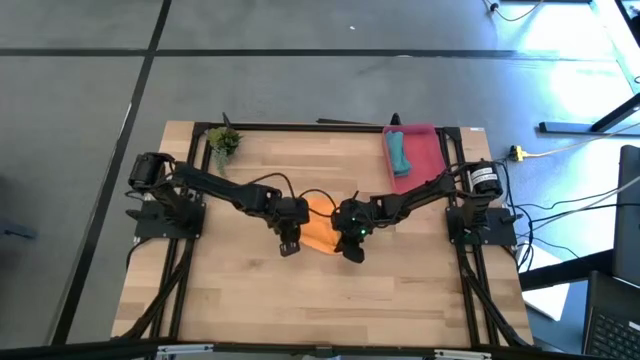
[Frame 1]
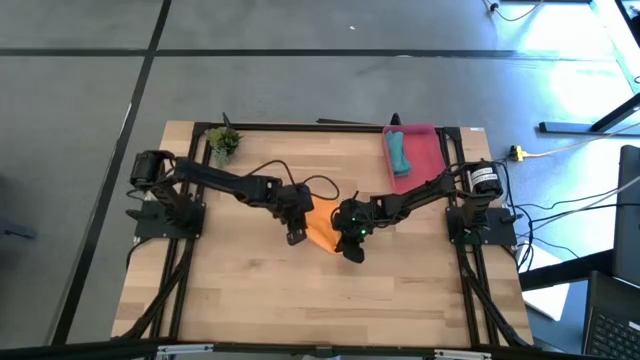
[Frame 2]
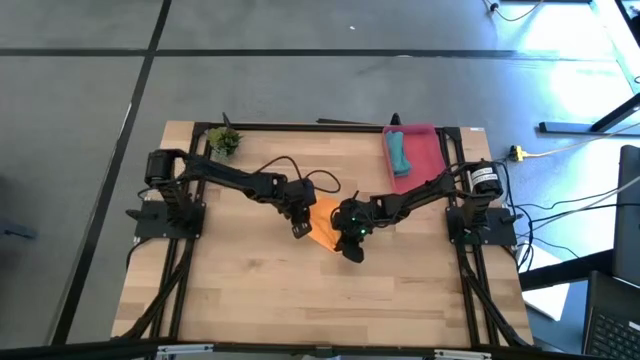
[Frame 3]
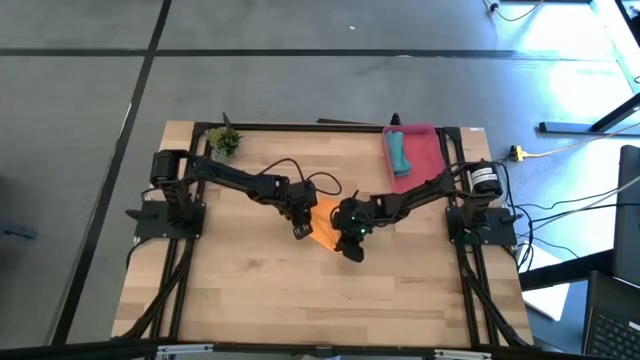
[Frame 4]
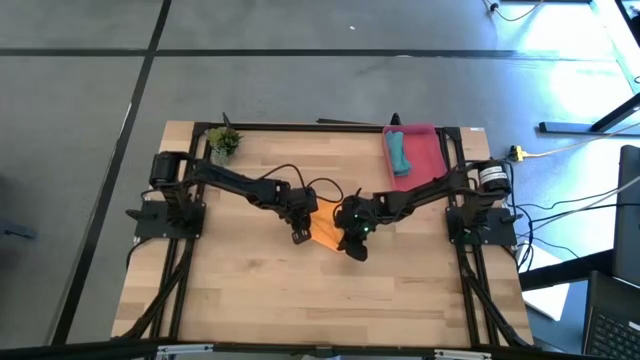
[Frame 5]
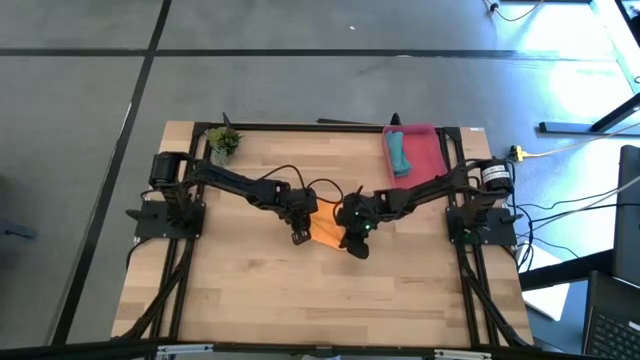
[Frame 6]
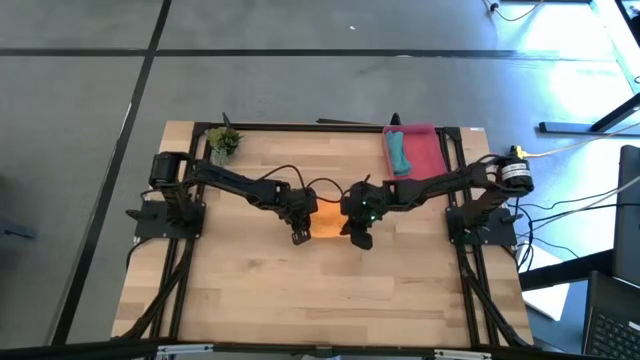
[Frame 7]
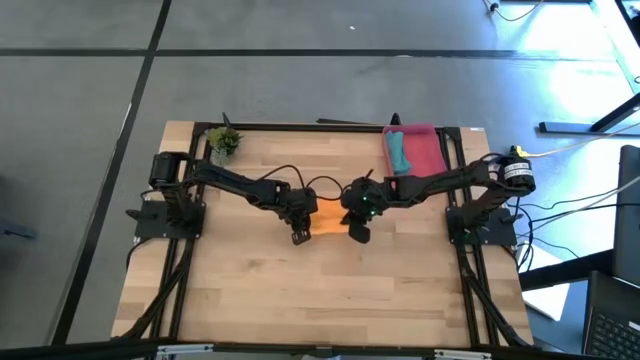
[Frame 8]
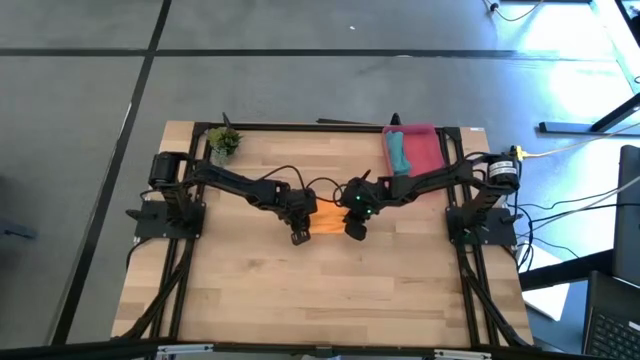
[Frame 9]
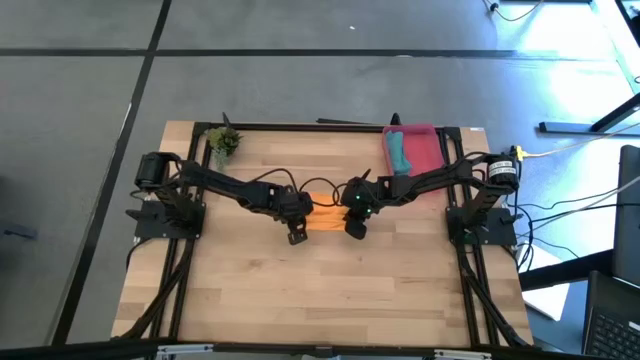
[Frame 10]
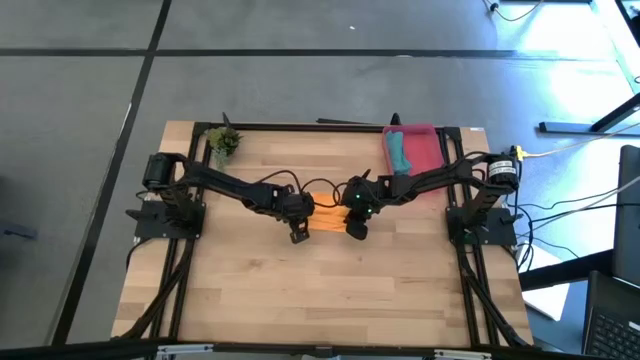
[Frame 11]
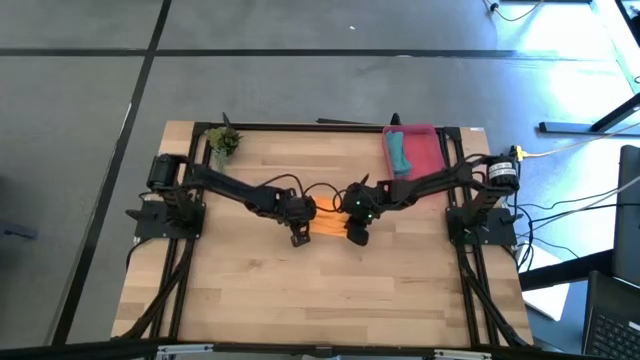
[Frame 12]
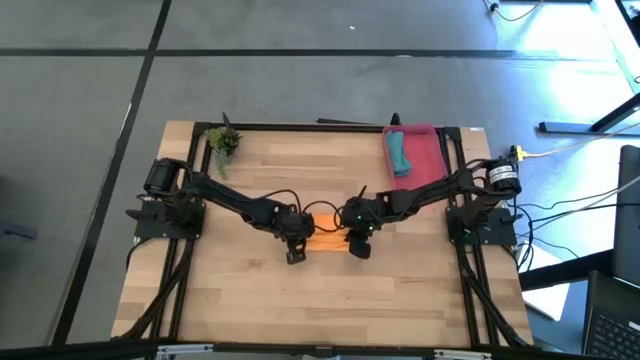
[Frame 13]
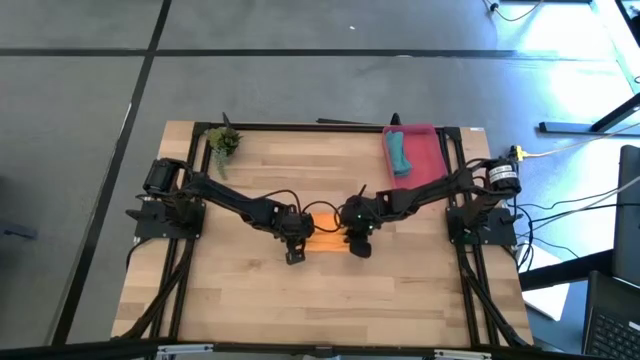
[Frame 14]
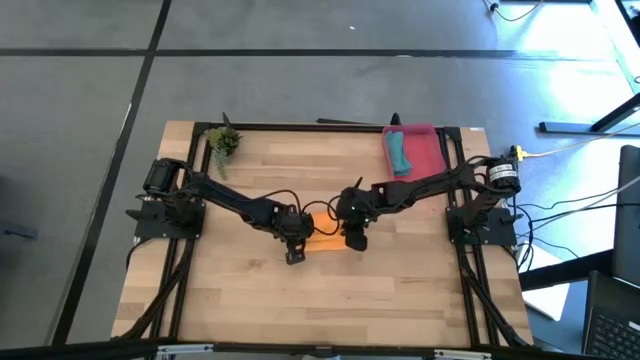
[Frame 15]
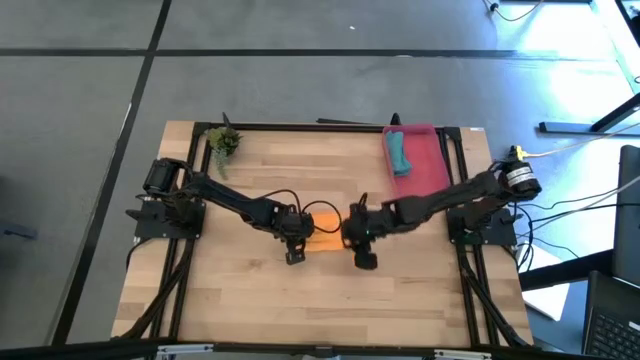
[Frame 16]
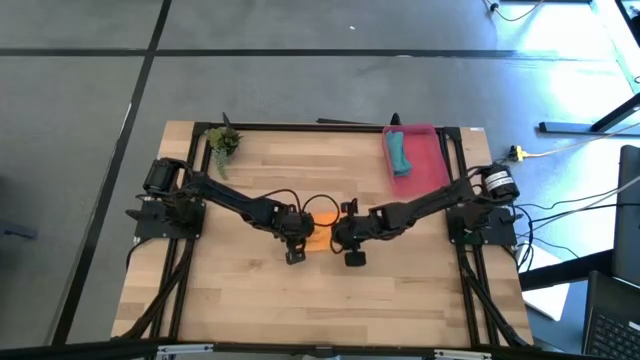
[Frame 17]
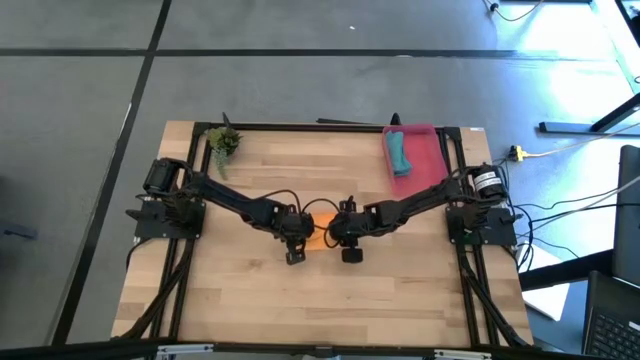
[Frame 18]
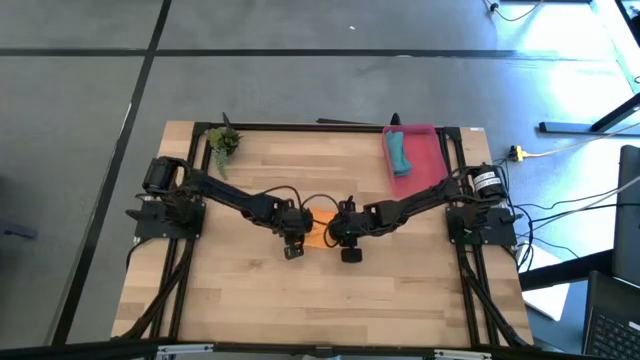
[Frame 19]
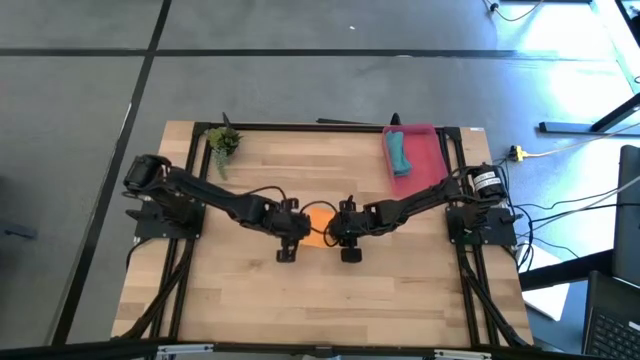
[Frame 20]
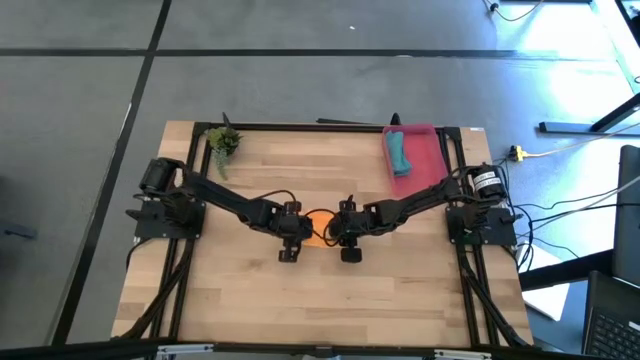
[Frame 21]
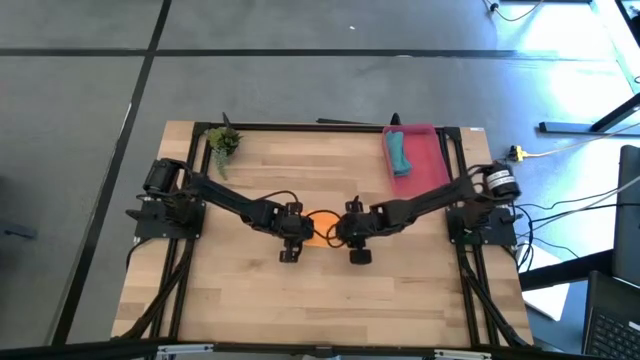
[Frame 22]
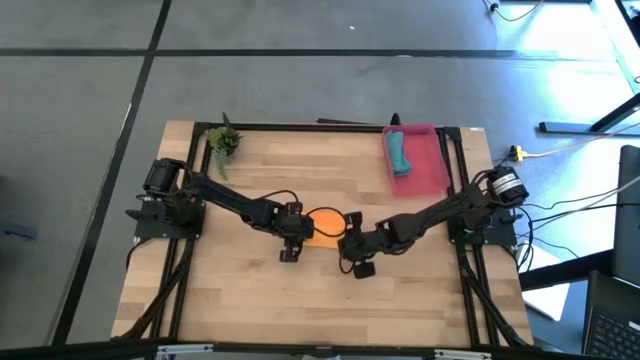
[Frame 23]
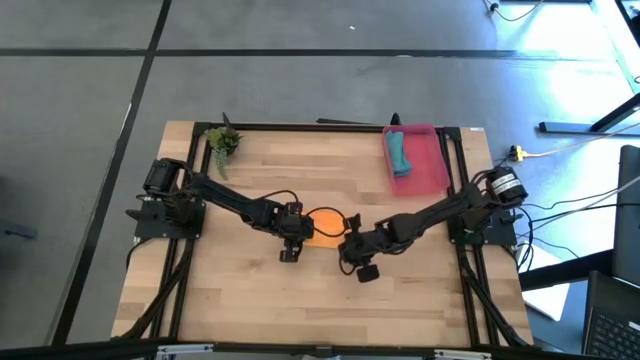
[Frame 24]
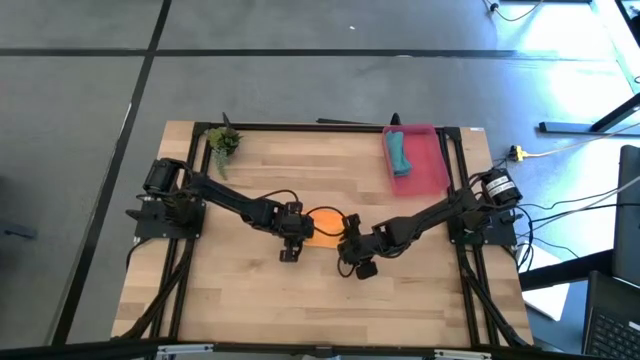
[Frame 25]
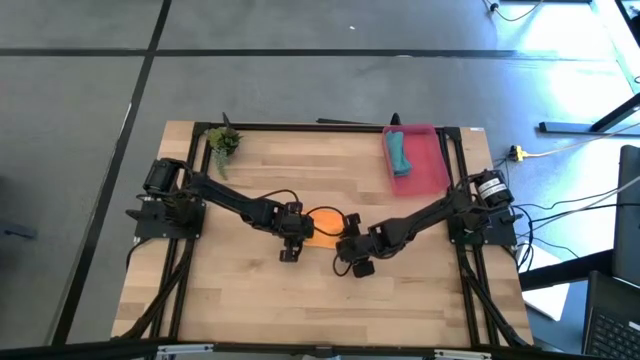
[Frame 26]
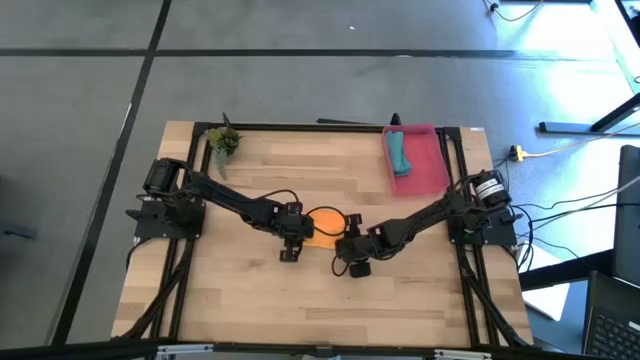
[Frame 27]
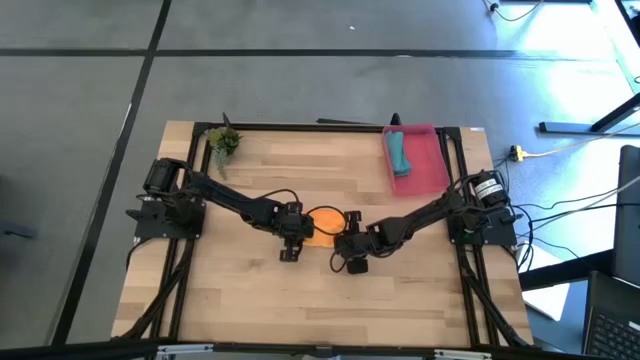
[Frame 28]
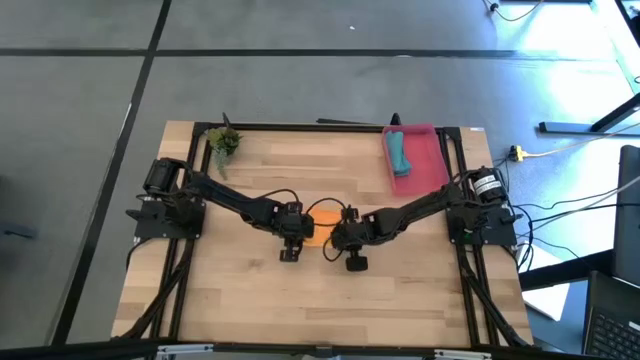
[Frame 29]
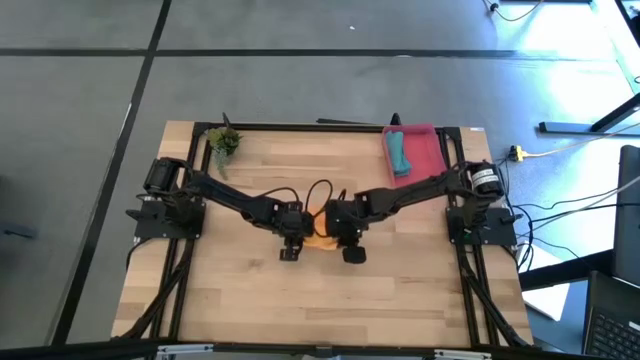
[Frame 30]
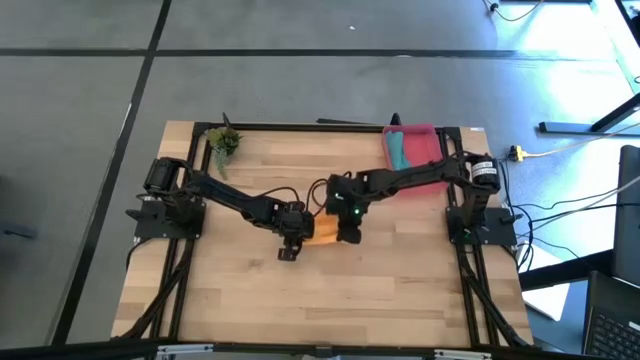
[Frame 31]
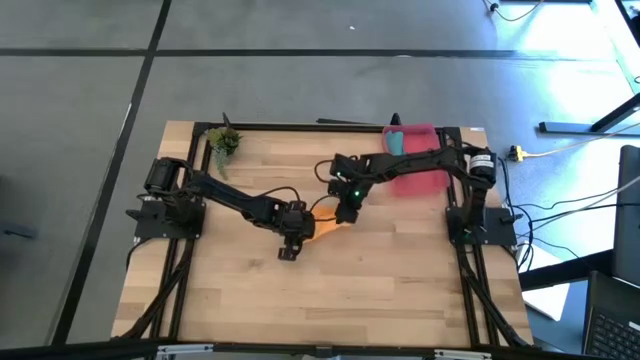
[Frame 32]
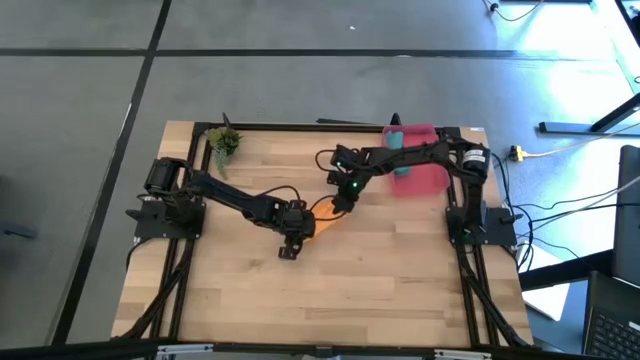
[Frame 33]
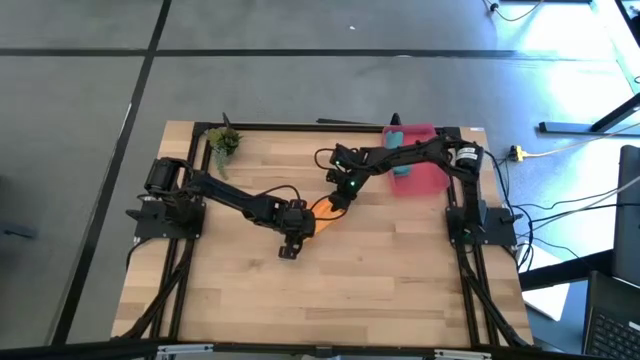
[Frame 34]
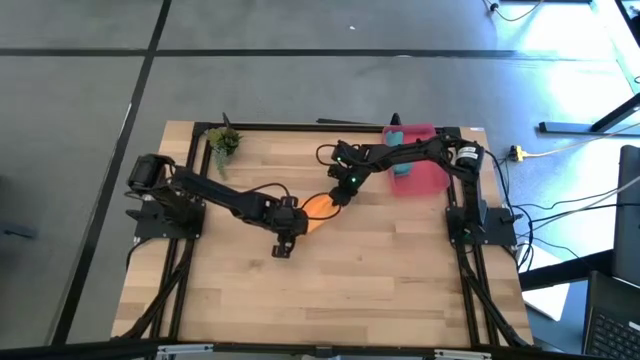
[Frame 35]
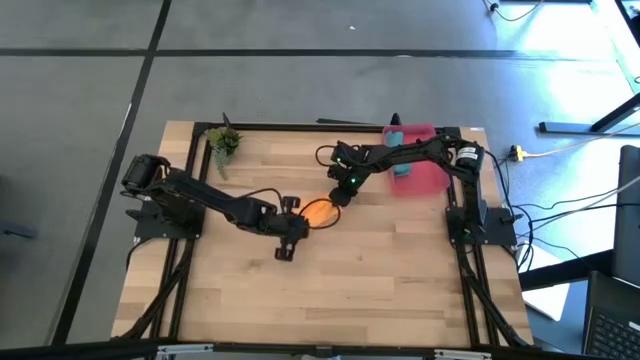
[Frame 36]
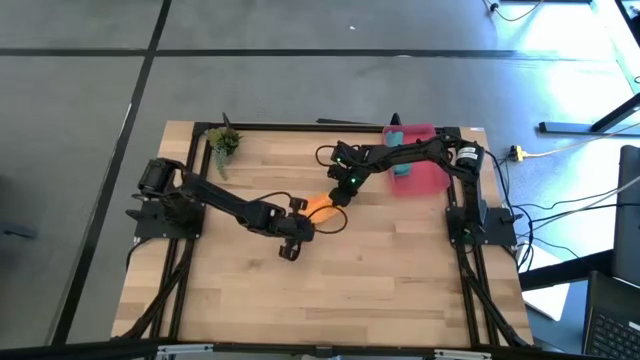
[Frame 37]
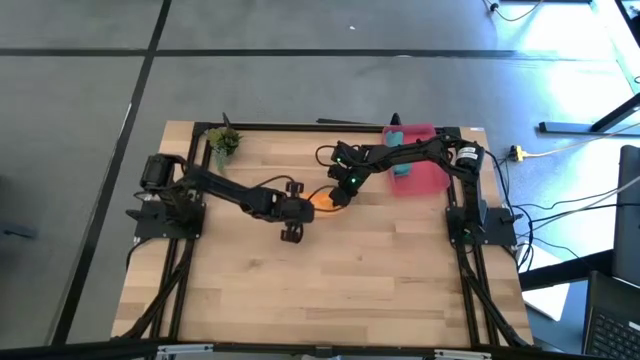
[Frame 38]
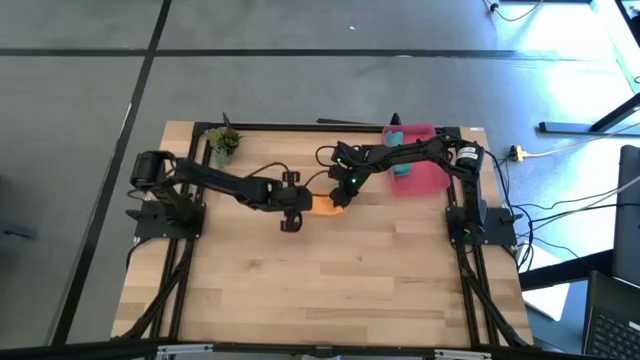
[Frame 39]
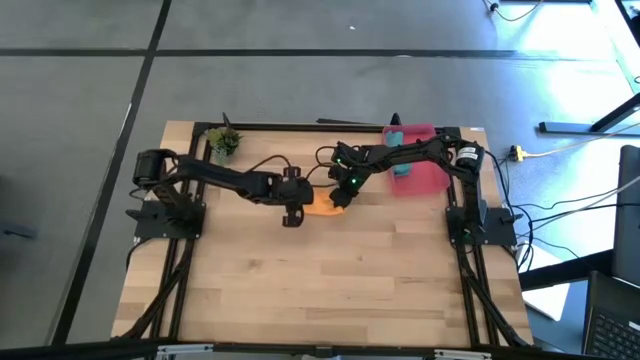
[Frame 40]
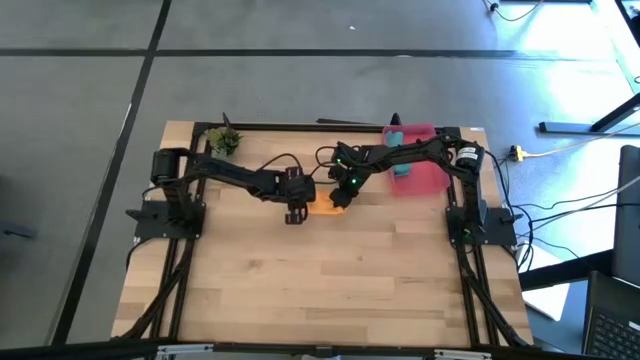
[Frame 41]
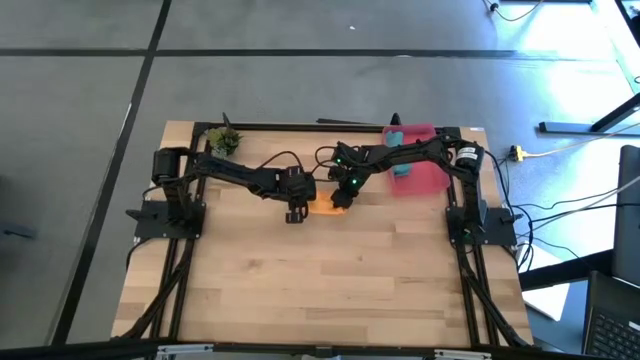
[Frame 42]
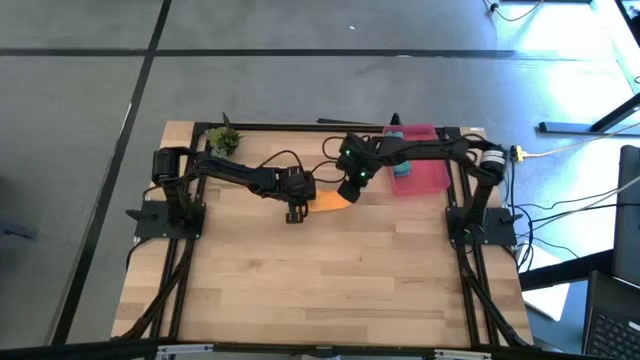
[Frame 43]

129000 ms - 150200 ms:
Task: Roll microfiber towels into tight, uniform cylinder then place into a basket
Roll the yellow microfiber cloth on the table

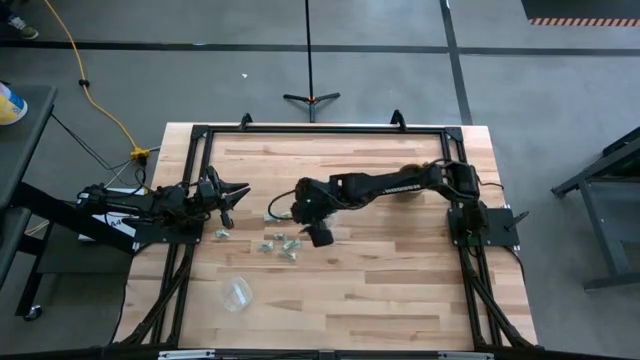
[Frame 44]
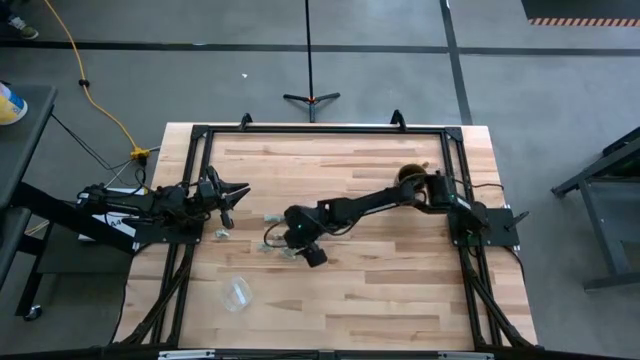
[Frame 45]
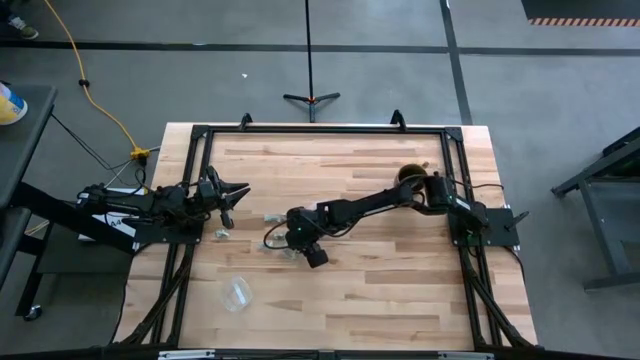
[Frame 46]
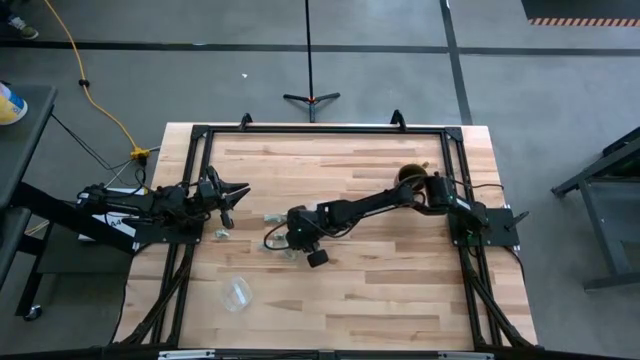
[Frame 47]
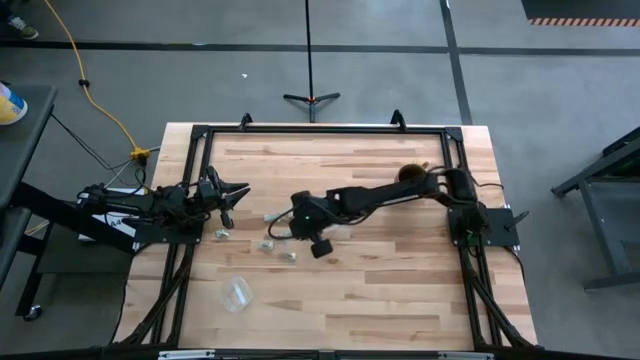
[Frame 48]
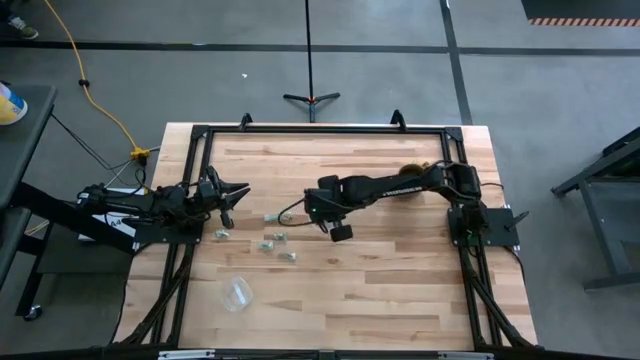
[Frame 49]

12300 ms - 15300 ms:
Task: Pick and place items into bin
Put the green stevia packet into the top transparent bin
